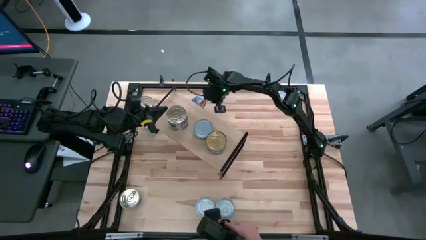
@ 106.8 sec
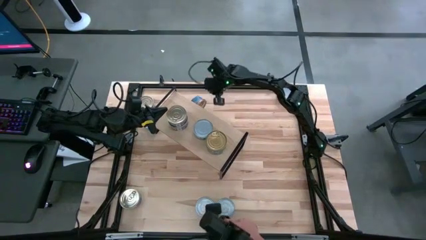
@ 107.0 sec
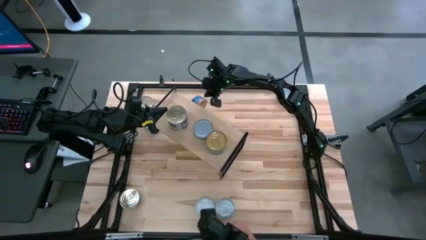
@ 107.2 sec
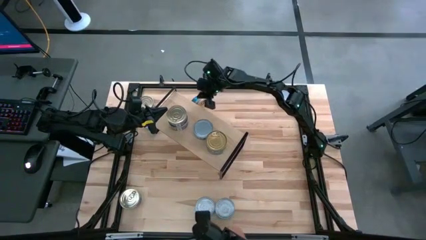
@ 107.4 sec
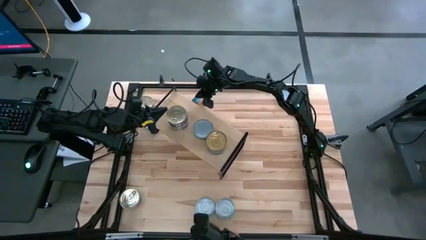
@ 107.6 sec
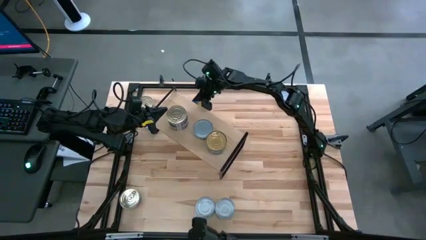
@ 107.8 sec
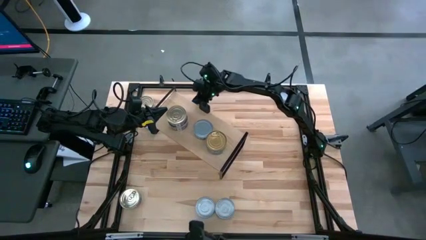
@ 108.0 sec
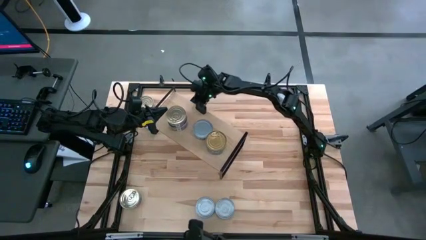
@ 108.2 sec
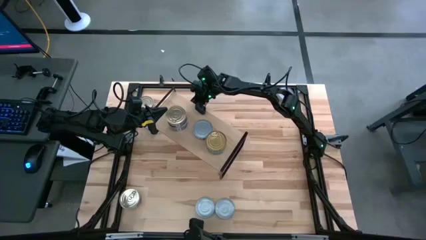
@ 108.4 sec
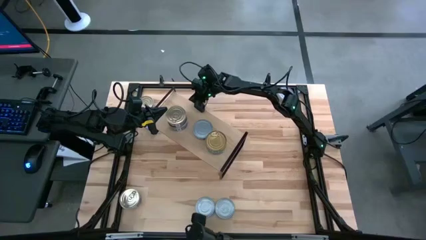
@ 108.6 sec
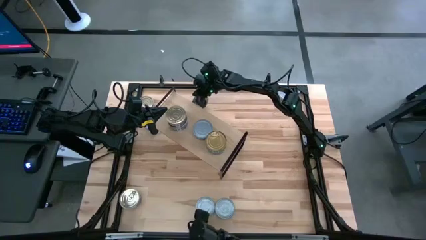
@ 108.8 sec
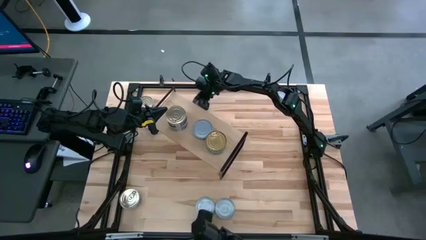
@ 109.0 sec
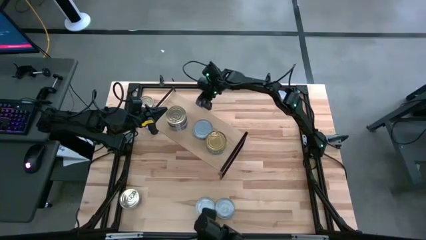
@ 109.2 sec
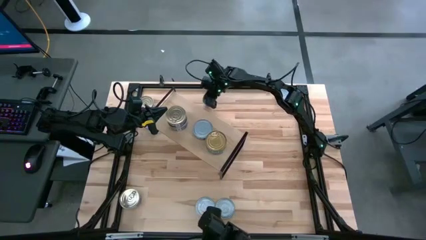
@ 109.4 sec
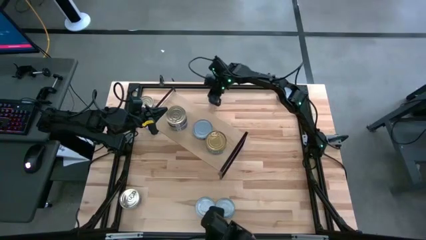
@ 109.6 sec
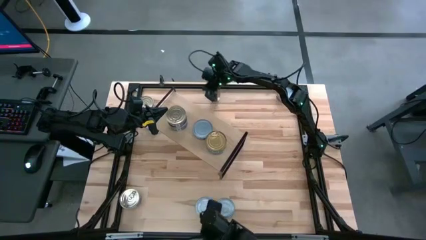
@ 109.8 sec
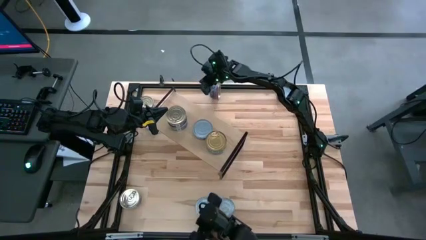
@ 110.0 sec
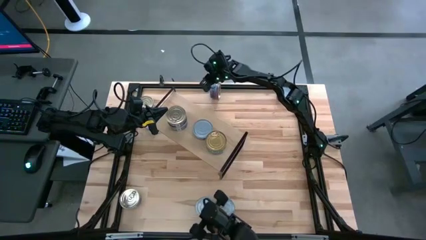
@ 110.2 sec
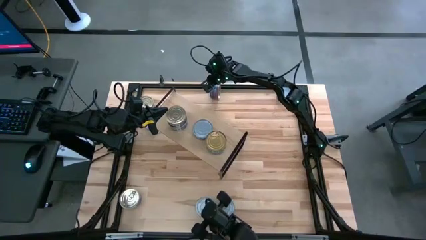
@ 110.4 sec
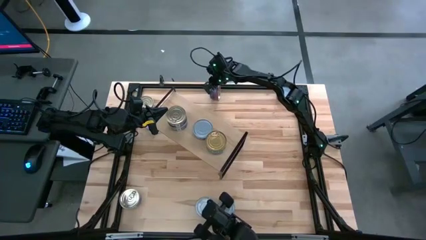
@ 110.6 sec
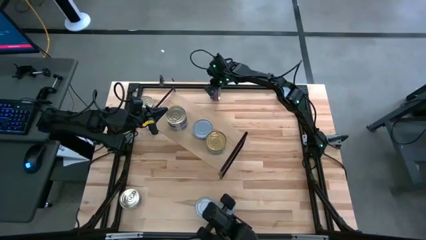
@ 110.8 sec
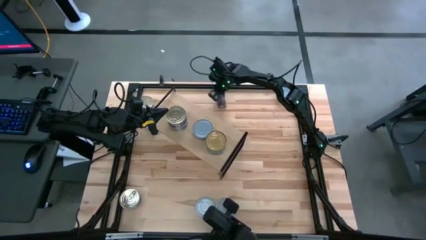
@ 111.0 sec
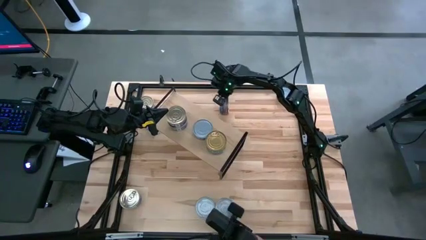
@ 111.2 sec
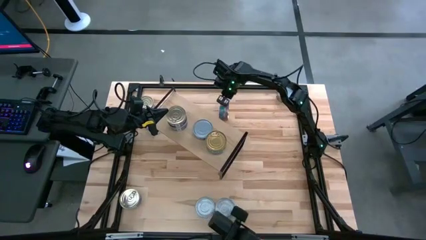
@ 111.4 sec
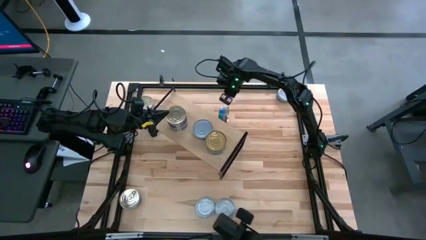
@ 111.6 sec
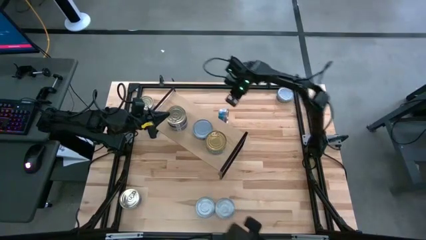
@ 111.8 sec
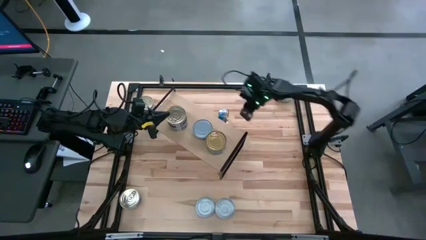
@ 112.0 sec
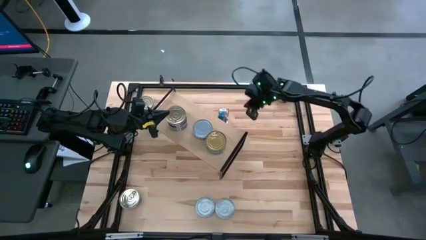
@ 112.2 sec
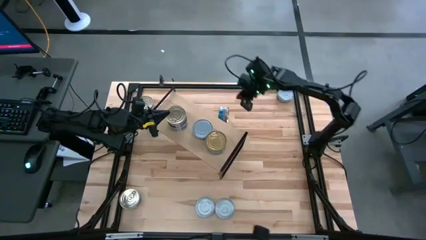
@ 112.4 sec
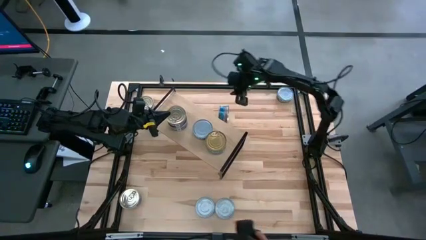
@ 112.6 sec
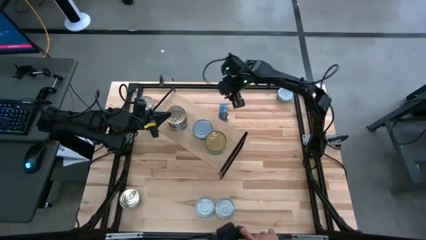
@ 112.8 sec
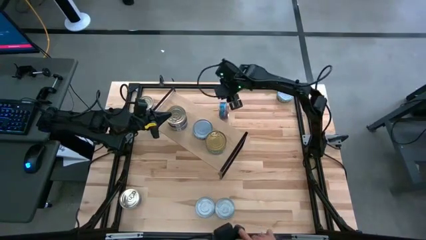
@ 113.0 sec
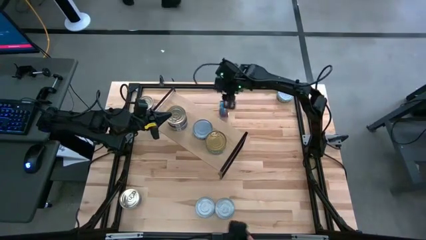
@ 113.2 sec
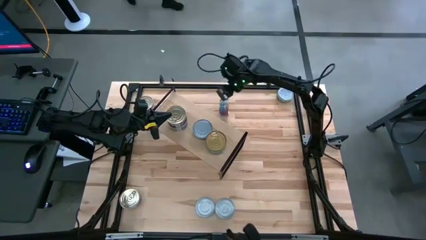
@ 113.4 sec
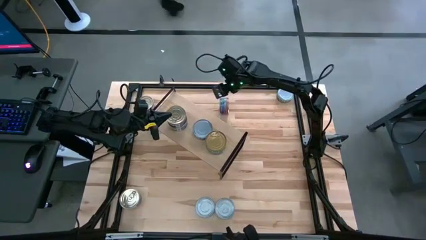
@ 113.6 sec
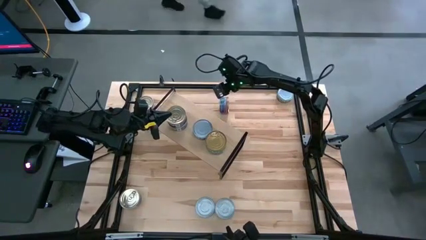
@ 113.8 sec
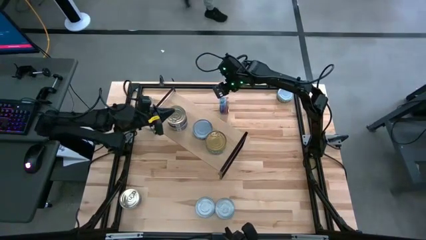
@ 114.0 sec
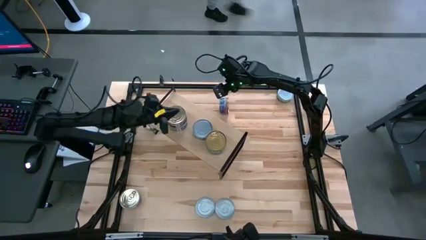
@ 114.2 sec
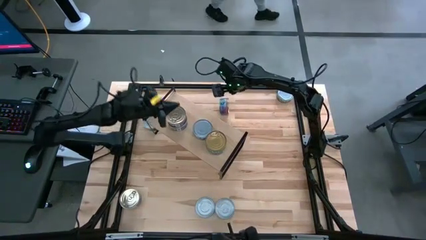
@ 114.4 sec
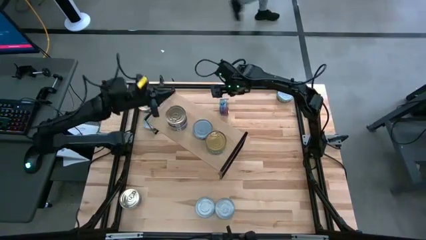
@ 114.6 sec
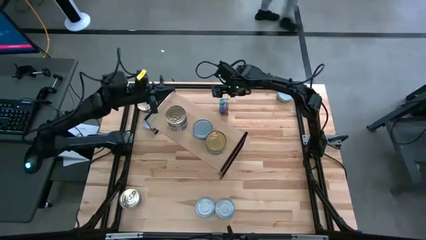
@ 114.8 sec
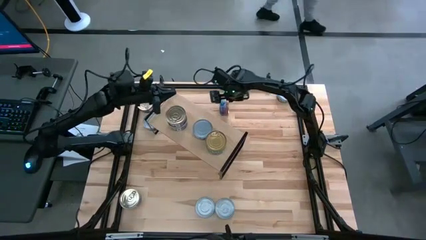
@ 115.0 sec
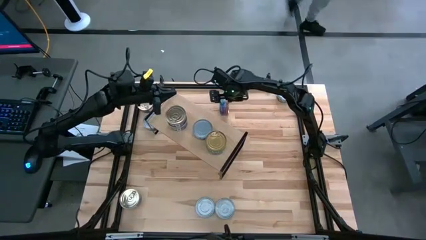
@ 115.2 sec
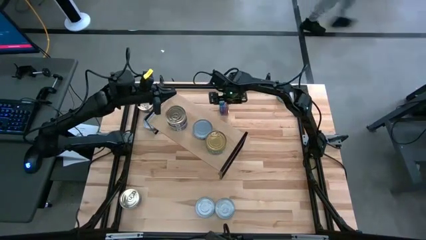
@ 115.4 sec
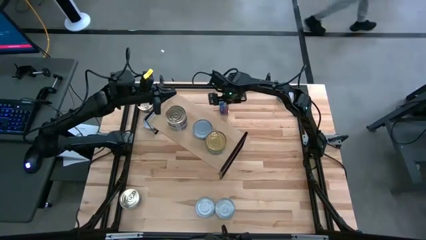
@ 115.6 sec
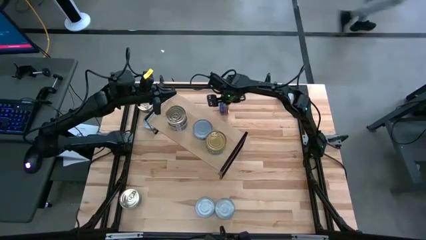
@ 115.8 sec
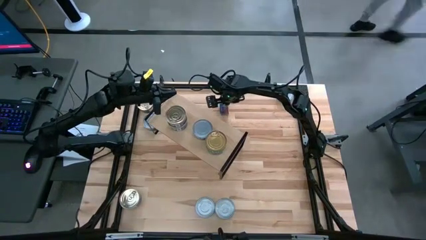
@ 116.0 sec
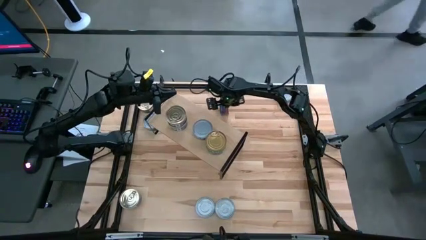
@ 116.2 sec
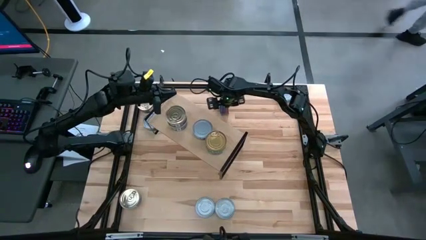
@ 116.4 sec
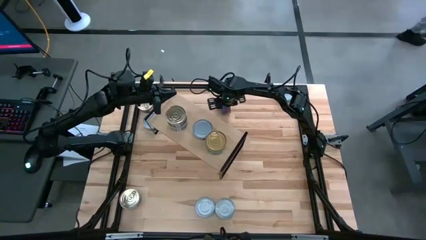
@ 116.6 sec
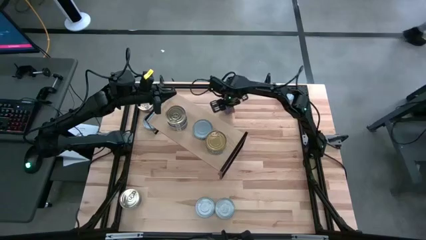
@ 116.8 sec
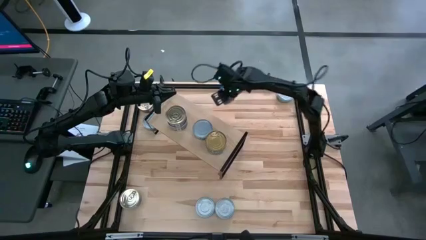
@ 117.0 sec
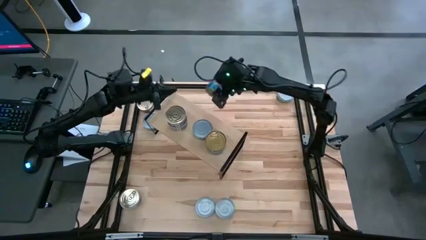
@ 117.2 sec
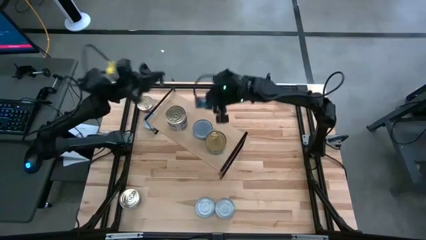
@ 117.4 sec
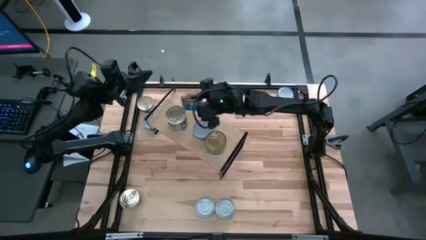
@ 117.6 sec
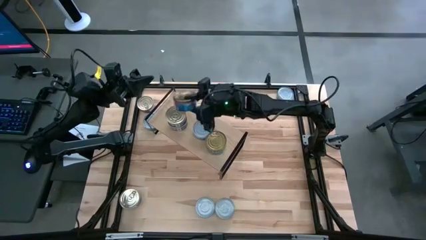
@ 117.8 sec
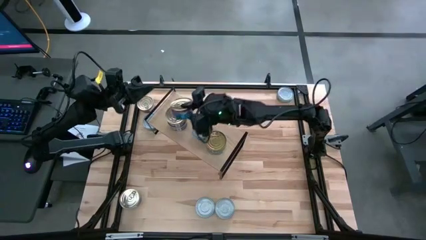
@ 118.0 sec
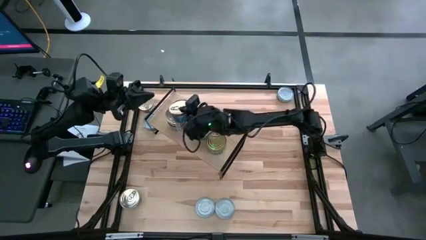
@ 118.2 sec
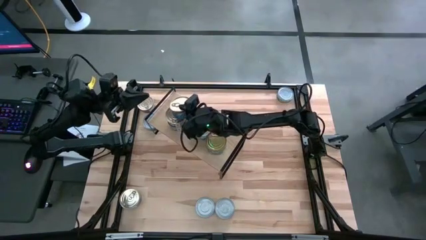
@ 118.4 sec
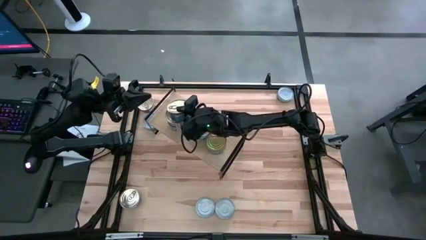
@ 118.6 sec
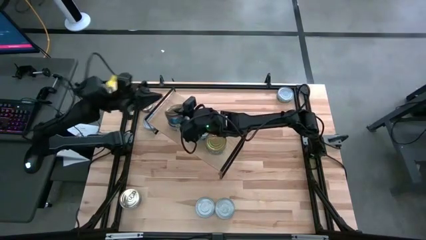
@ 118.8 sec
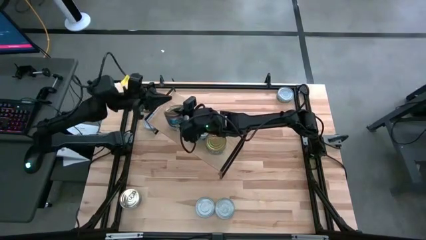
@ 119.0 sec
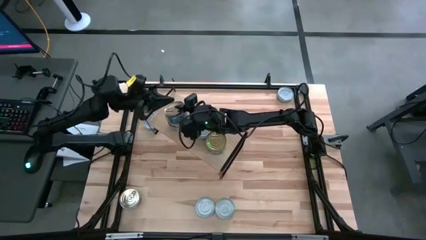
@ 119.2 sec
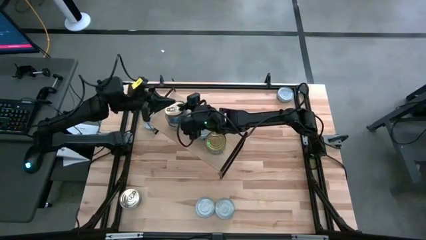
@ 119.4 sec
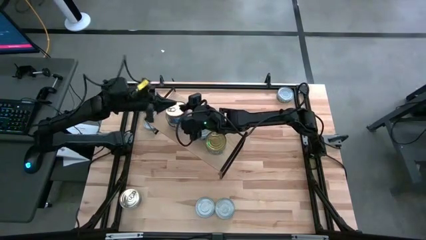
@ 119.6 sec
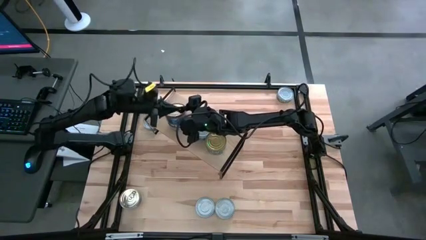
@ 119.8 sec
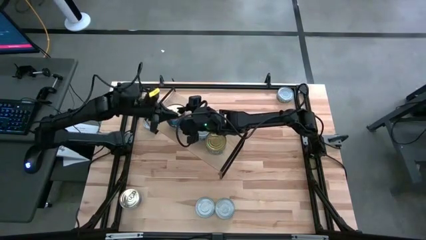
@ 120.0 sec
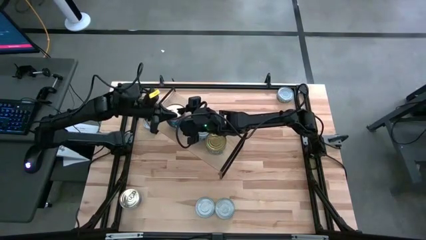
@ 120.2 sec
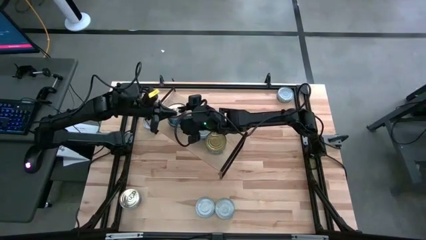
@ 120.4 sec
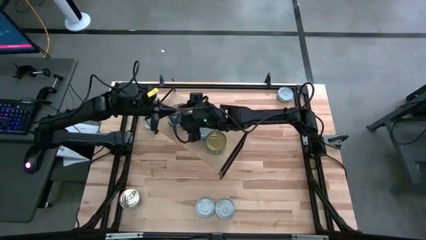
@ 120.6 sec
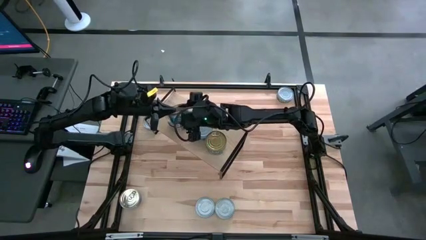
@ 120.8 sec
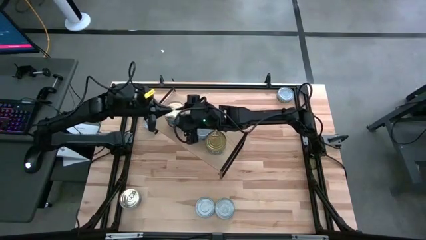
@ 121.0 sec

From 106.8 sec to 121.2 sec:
Task: Stack canned seafood by type on shelf
Stack the blue-pink tuna can on top of the blue-pink tuna can on the shelf
